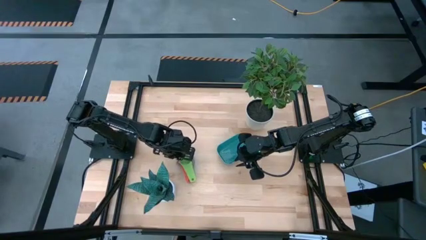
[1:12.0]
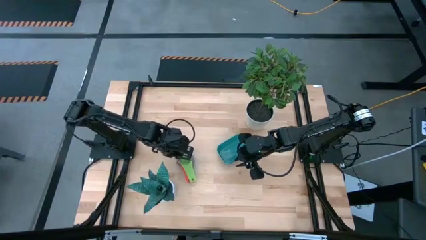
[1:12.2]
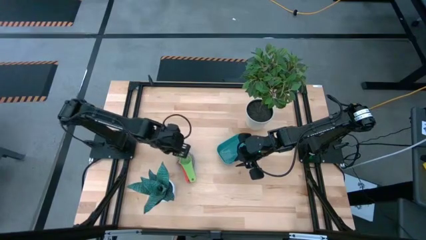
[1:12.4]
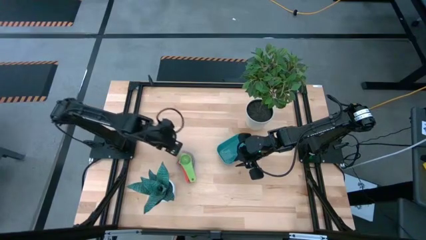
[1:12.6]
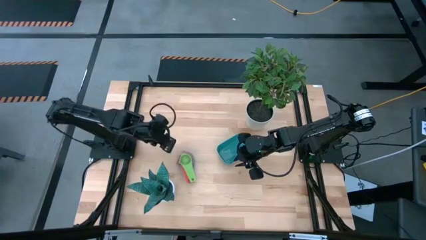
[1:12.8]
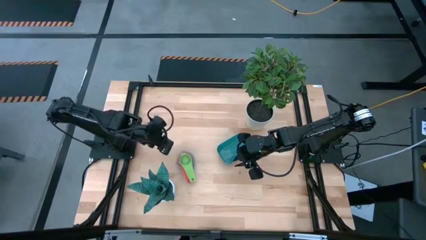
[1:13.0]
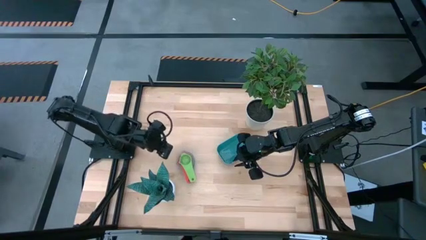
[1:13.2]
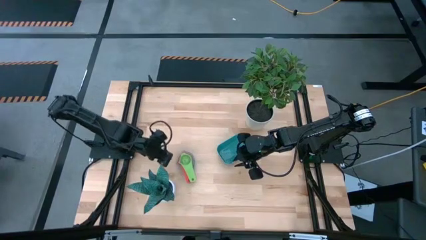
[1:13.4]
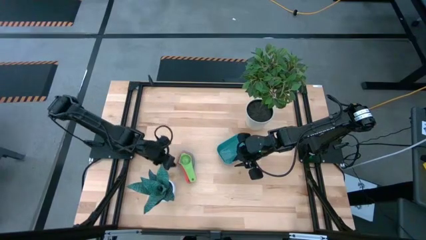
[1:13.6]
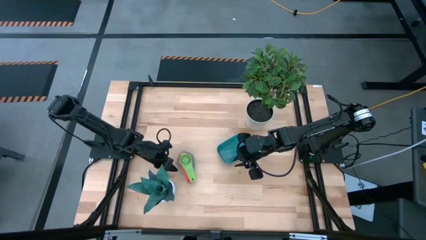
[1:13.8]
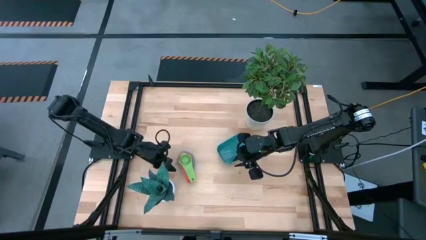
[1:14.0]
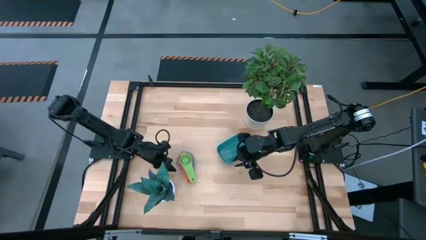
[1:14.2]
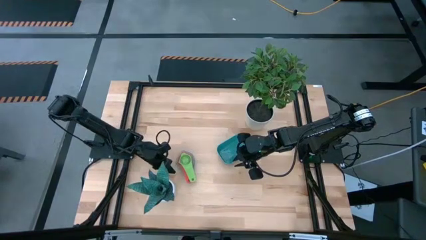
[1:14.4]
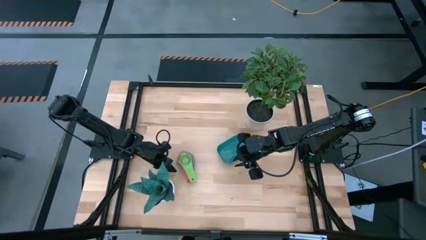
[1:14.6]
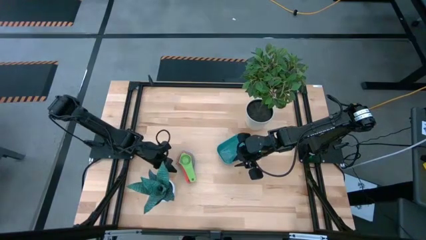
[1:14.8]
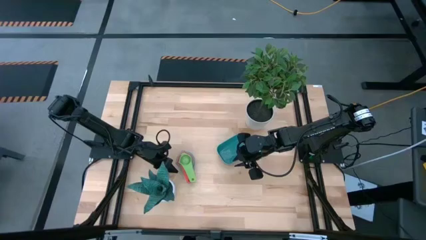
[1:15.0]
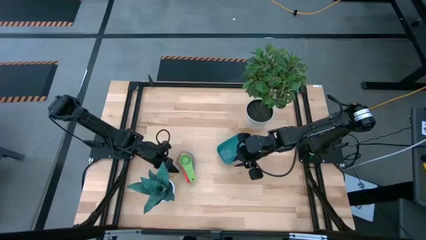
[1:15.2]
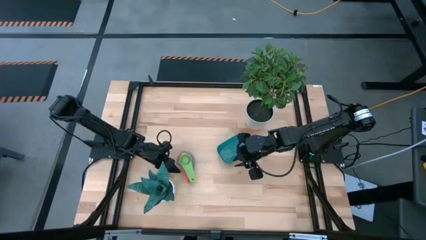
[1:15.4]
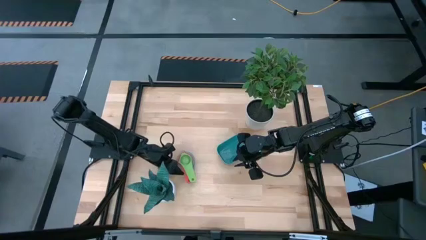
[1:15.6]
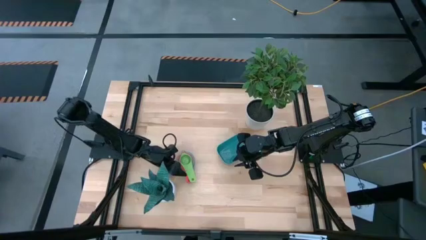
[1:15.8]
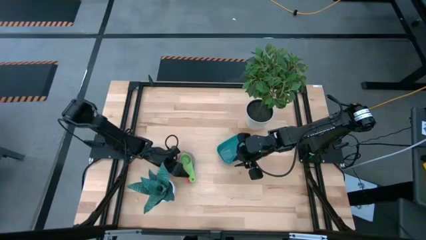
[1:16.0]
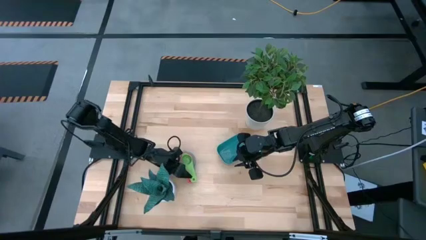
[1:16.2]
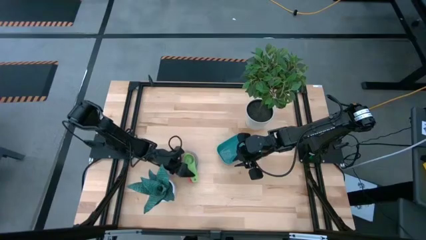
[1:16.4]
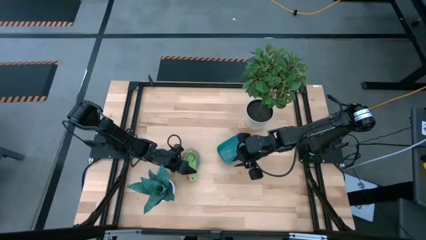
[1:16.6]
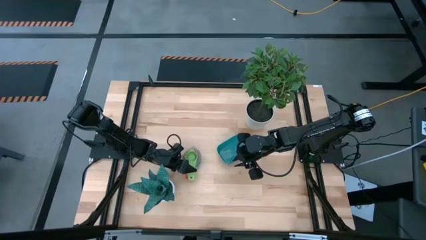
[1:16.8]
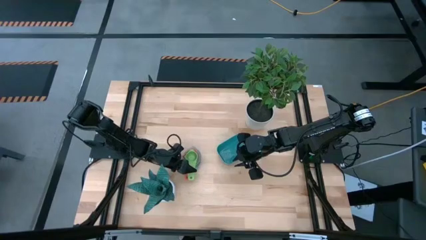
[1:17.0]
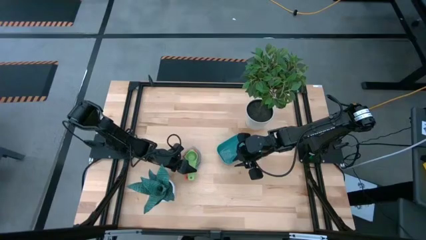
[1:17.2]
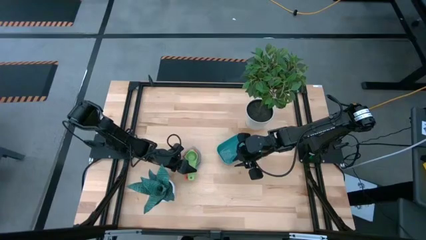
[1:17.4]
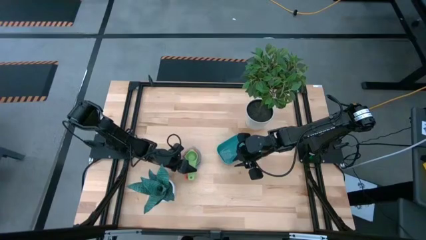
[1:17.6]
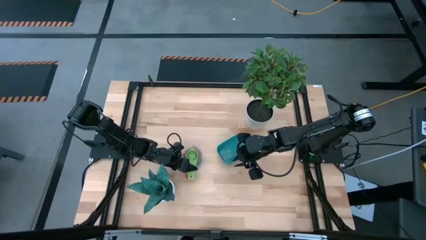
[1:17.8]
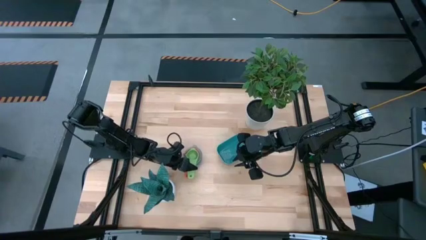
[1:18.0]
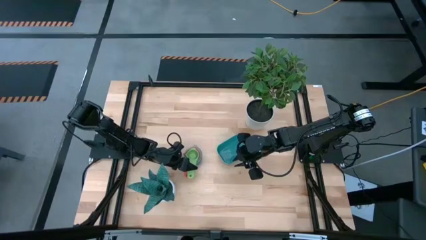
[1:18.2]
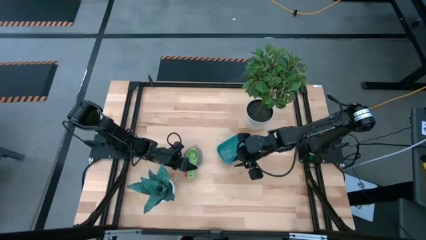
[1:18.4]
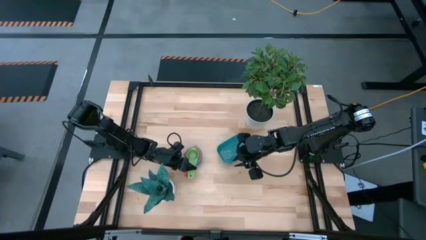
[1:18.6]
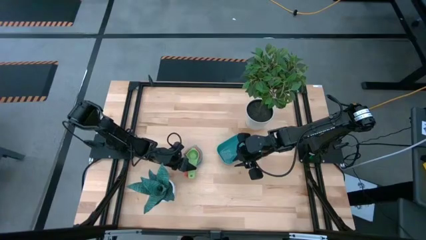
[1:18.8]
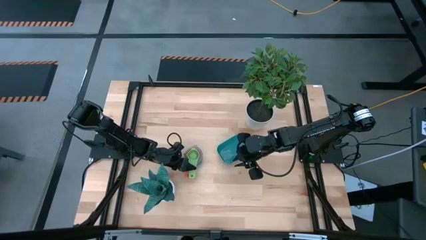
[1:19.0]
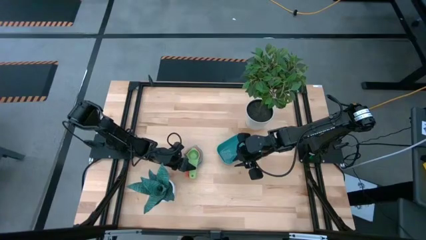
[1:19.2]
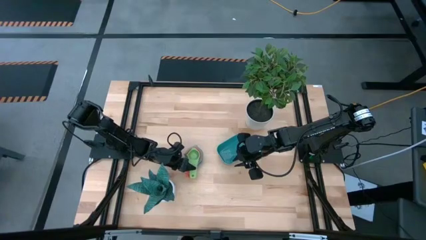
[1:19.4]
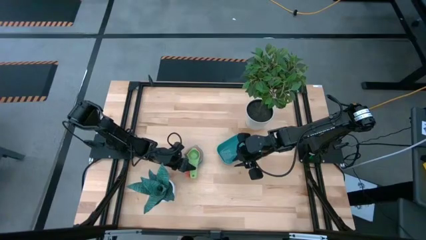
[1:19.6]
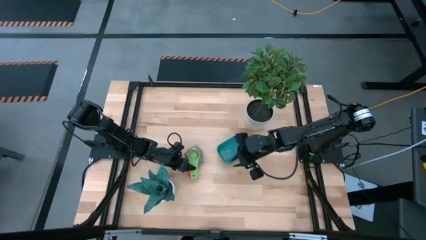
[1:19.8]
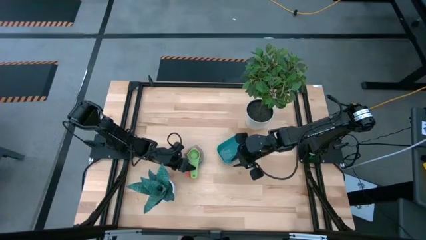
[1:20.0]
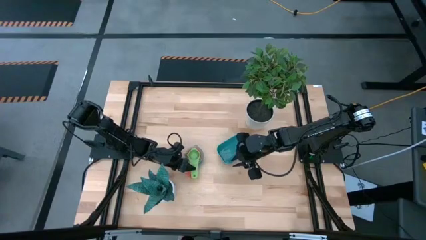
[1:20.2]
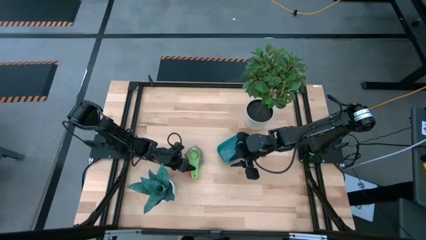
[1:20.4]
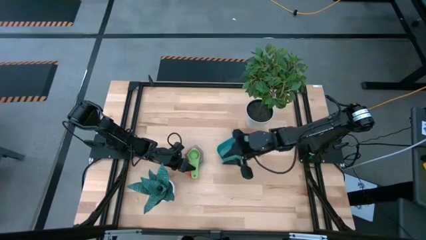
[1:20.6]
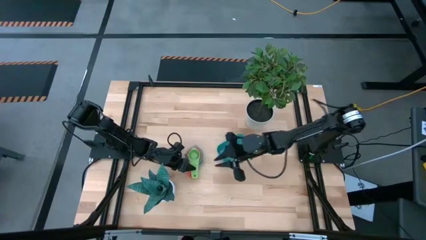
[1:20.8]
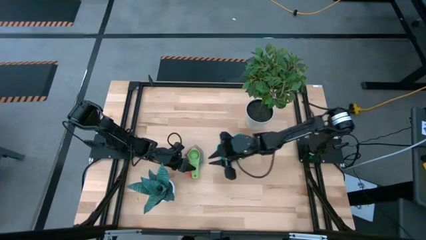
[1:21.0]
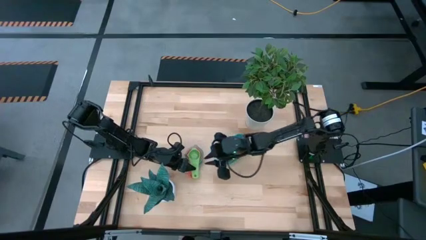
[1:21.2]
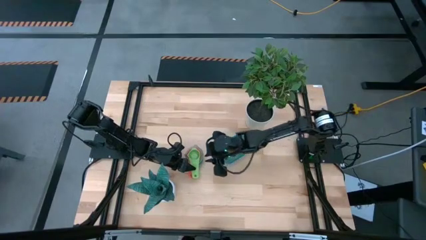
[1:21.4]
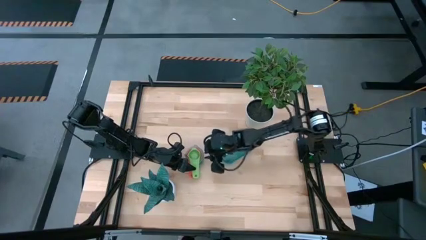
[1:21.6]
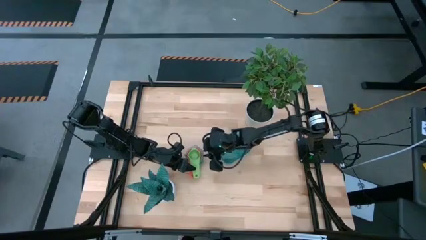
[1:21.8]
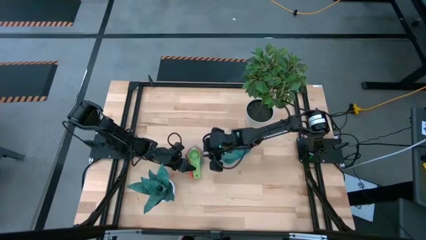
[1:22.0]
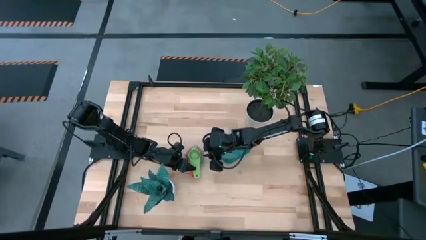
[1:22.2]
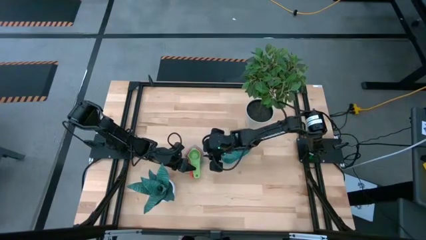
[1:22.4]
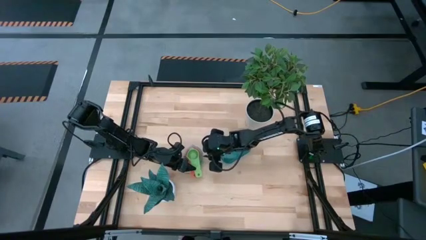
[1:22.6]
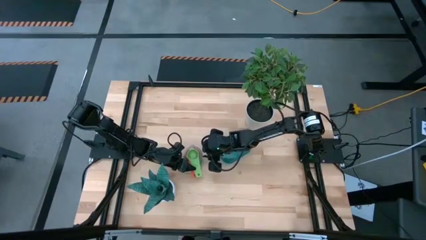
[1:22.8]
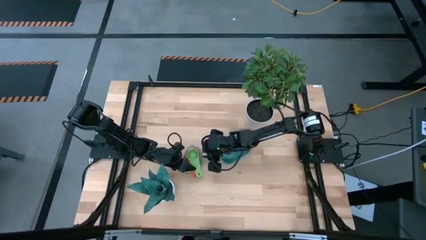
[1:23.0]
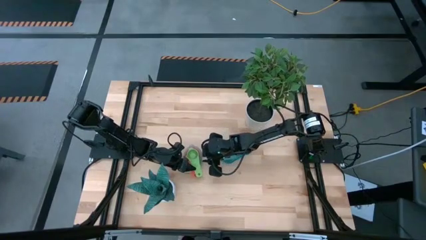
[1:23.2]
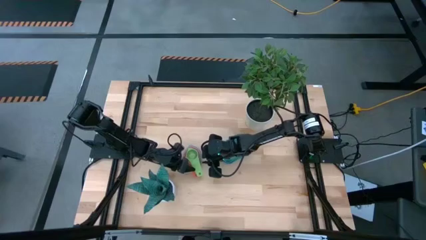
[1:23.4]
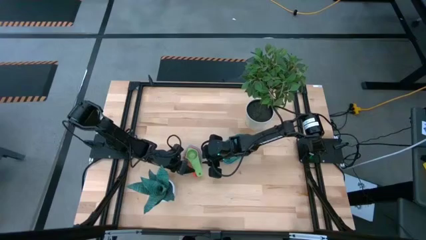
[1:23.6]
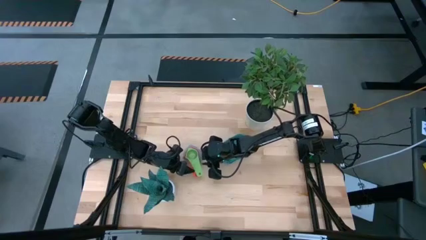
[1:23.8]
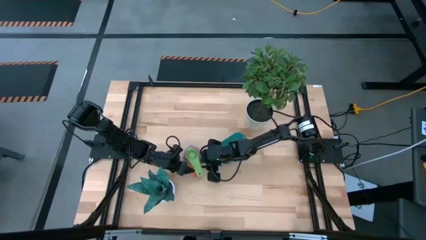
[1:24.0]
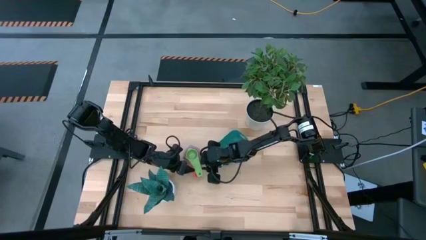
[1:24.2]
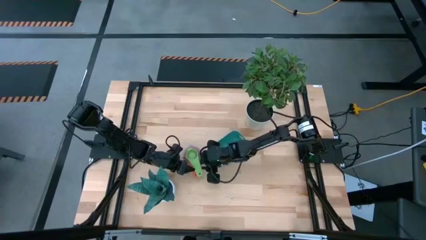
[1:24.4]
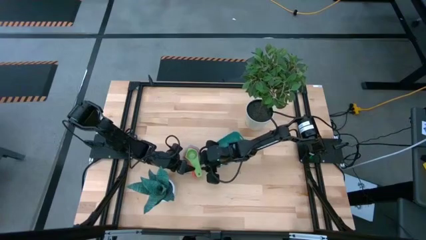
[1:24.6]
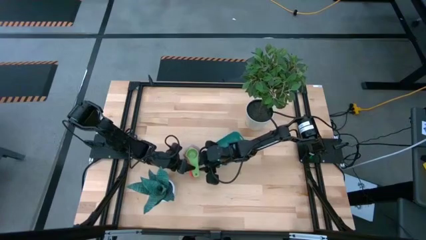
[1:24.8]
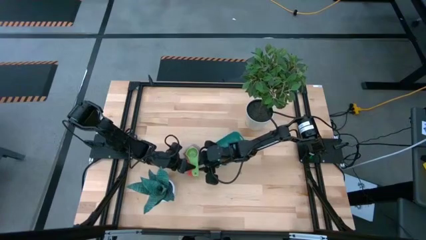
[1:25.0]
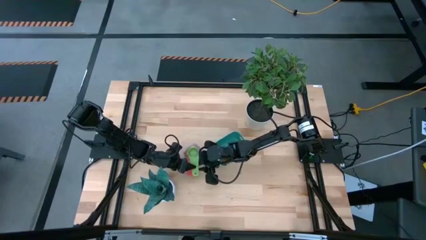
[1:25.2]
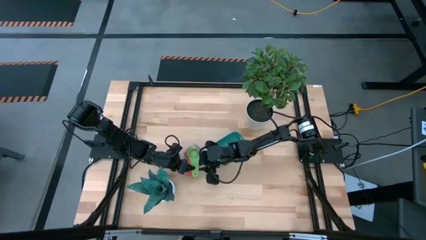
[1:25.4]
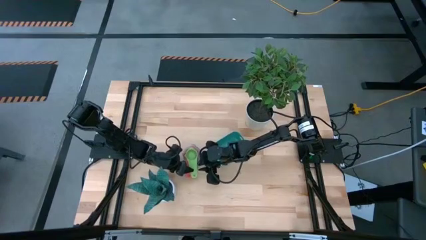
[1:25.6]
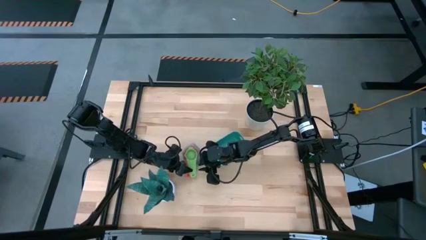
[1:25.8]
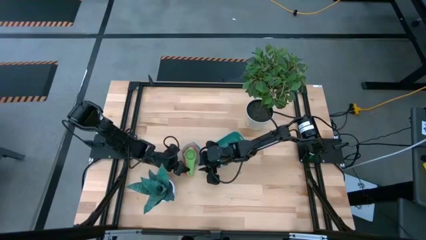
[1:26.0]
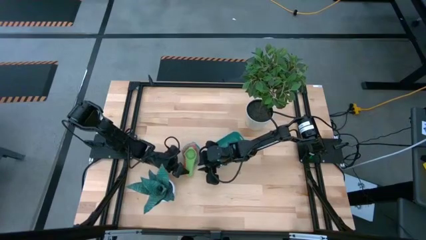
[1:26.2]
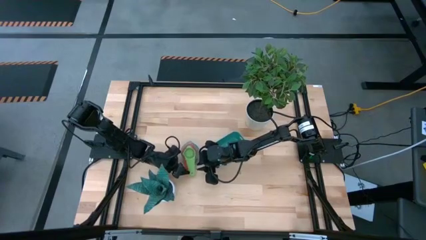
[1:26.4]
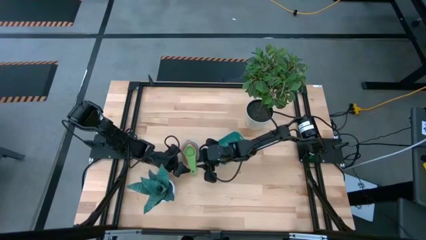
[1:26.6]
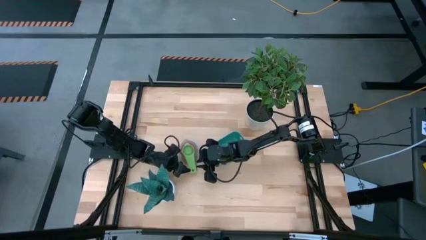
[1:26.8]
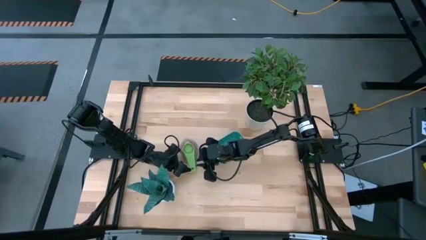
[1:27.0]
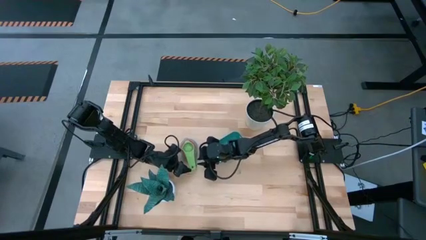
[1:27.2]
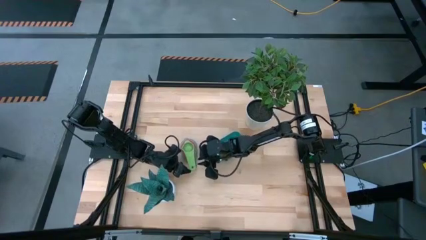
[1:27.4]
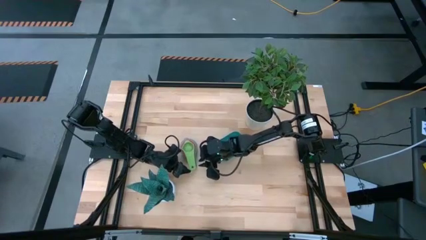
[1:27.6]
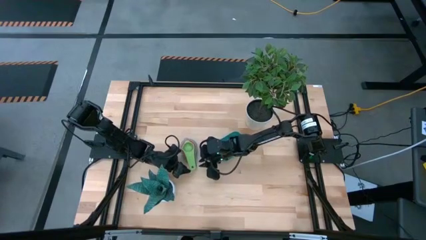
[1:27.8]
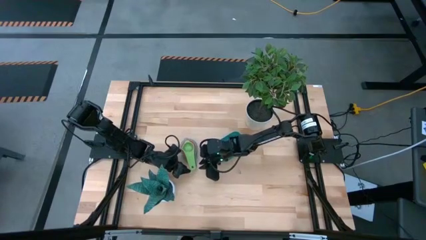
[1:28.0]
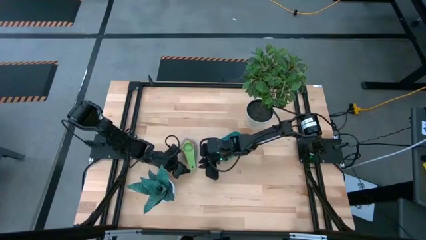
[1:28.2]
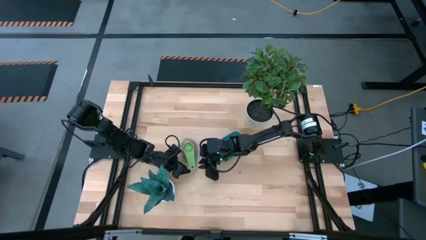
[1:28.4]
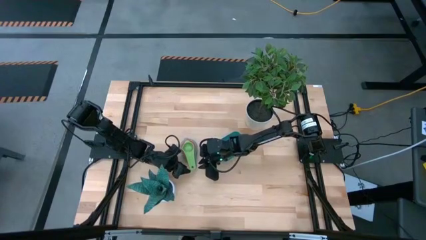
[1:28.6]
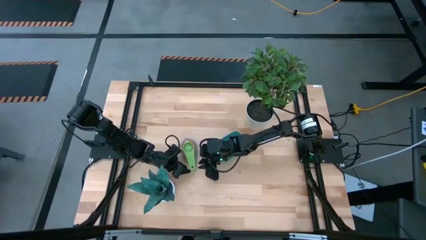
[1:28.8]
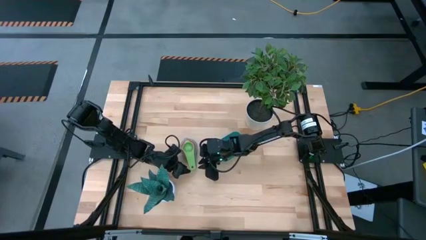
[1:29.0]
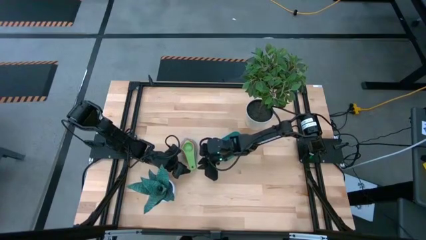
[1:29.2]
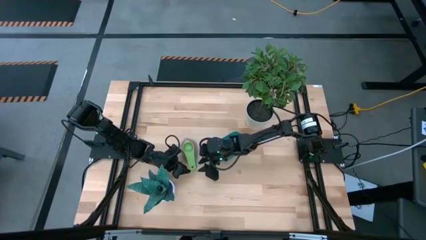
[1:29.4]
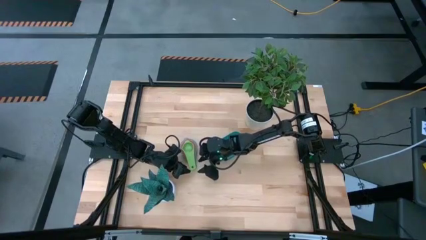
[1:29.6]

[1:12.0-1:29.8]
Task: Nest measuring cups in basket
Put the stacked measuring cups into the green bin
